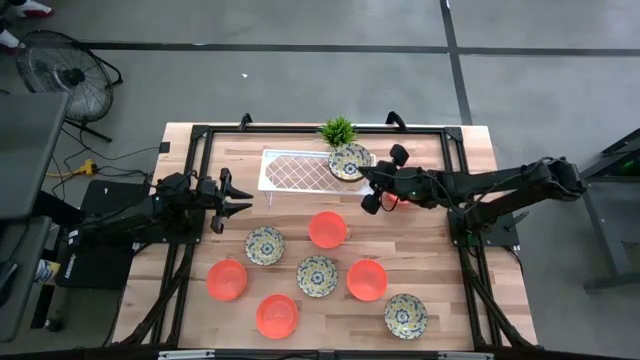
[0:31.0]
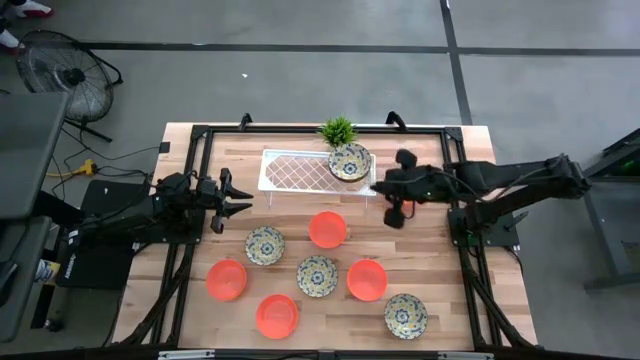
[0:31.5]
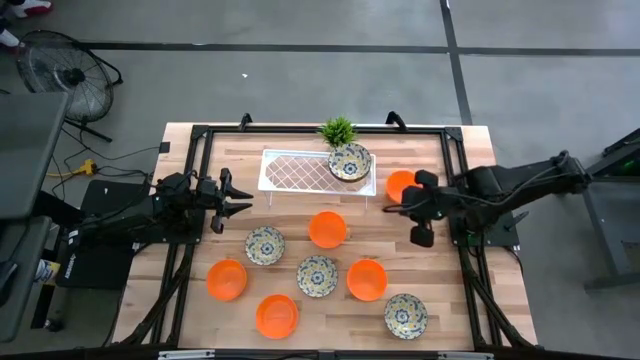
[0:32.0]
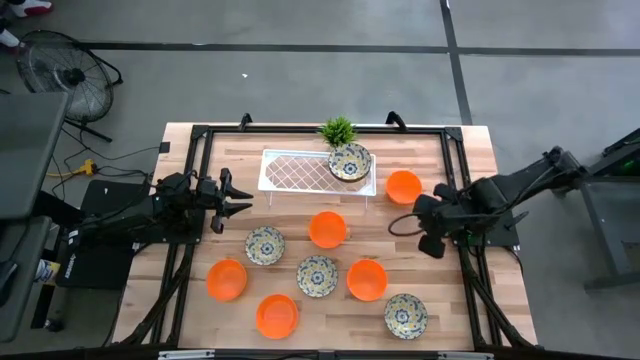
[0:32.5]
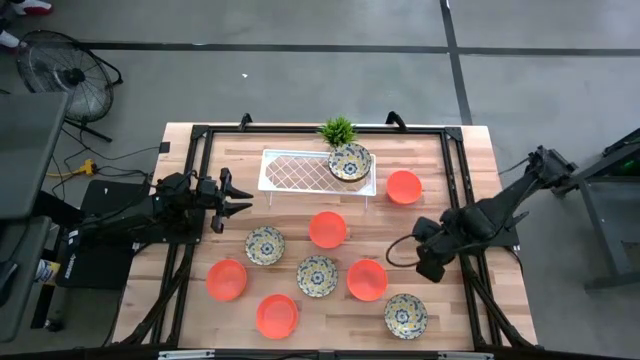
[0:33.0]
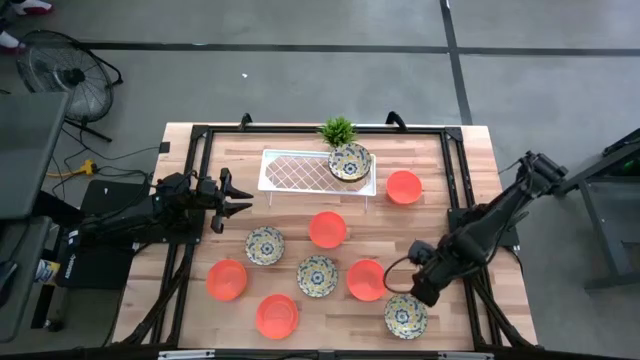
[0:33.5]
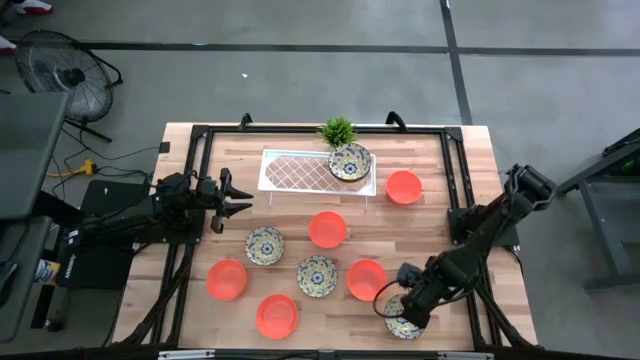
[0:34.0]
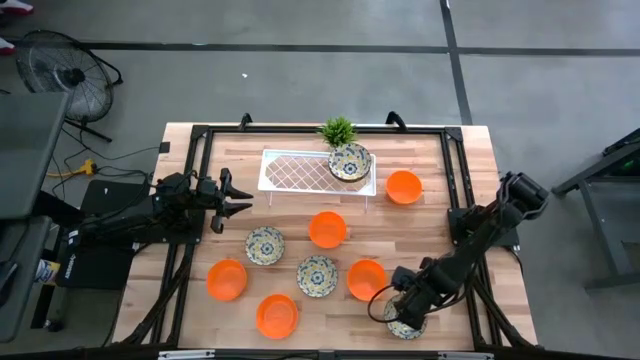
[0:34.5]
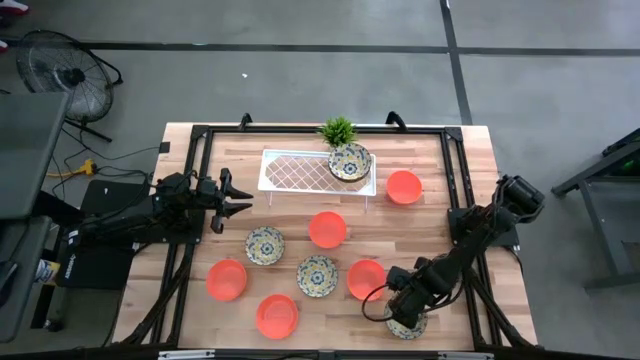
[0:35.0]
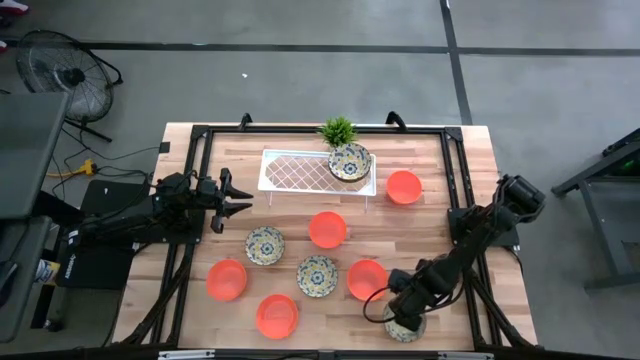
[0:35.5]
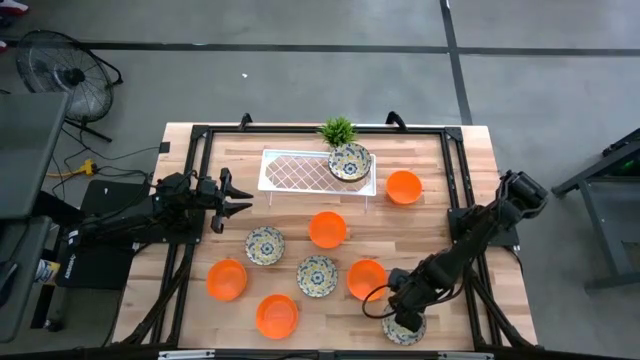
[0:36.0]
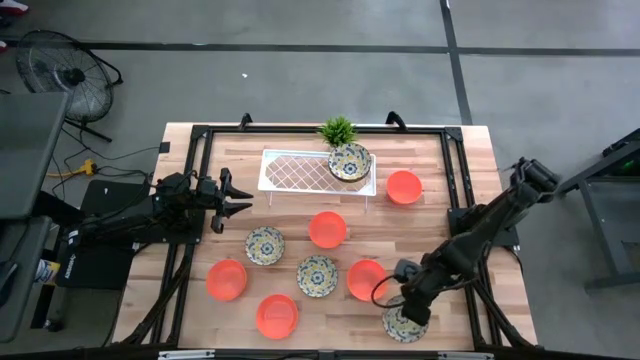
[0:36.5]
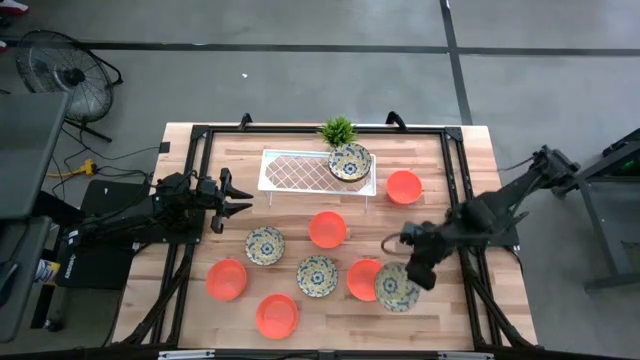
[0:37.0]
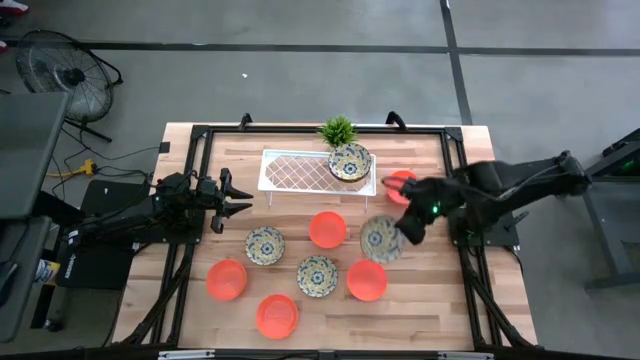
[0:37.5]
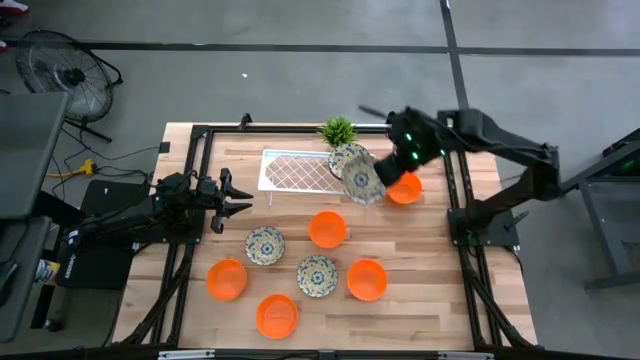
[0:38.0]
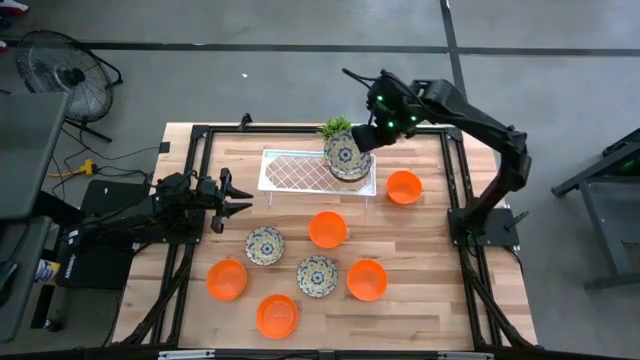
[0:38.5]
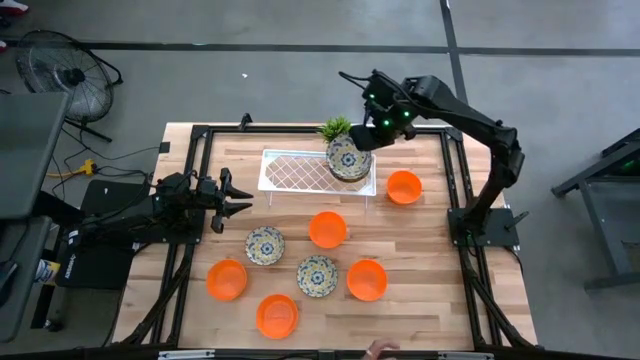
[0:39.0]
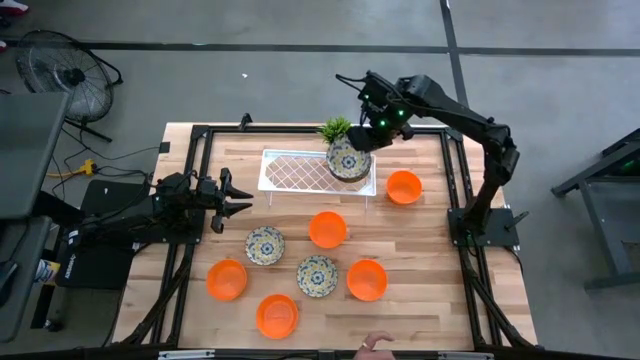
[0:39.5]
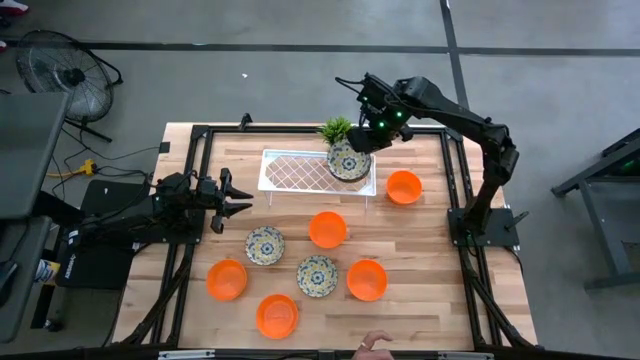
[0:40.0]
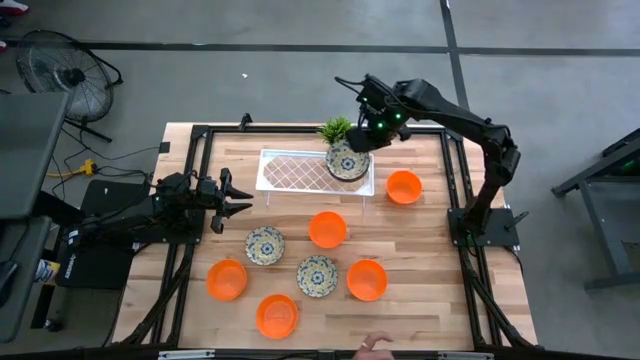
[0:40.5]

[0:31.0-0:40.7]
Task: Pick & Place Mini bowls
Stack the yellow bowl on the yellow bowl on the shelf

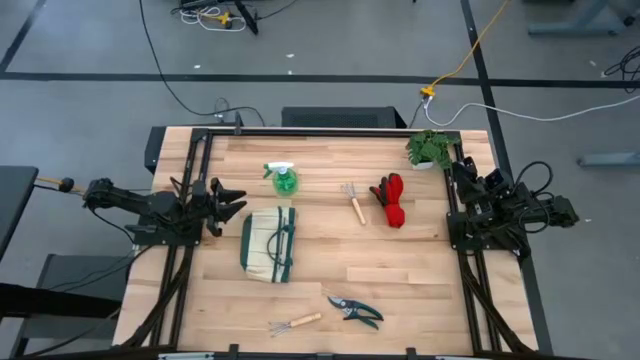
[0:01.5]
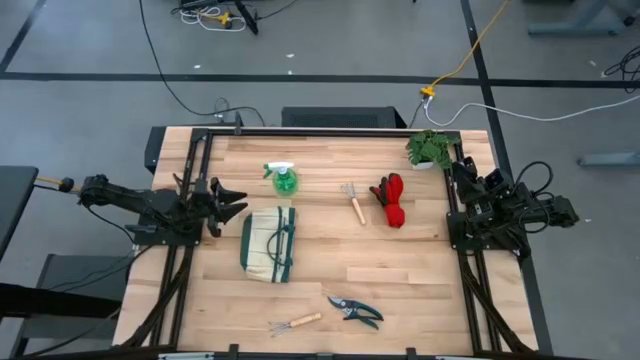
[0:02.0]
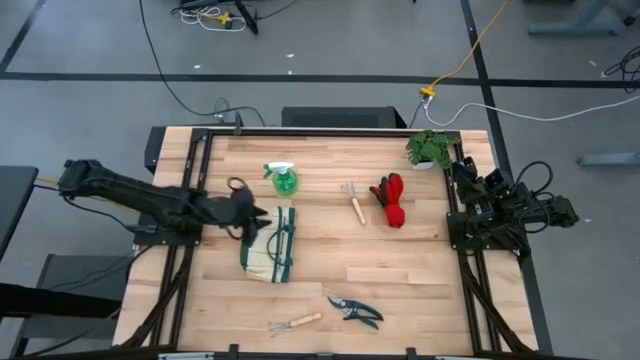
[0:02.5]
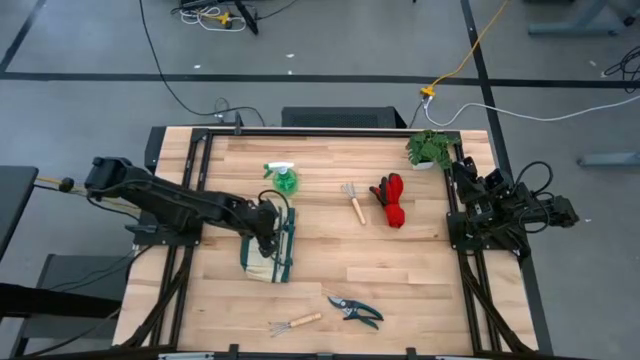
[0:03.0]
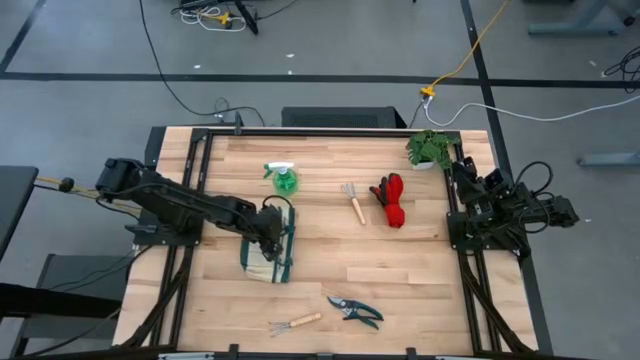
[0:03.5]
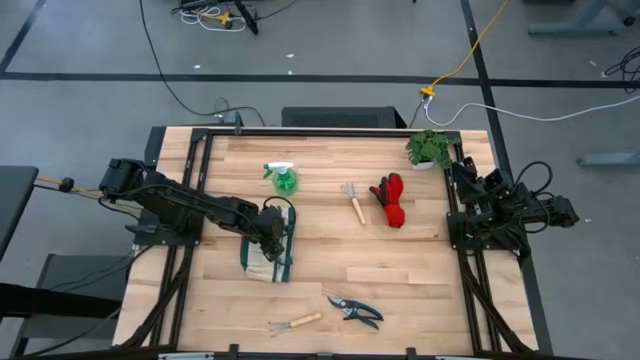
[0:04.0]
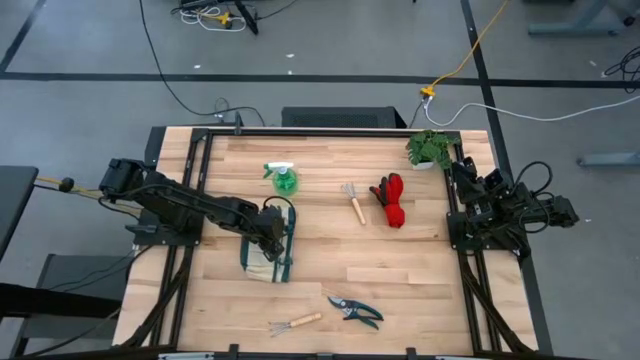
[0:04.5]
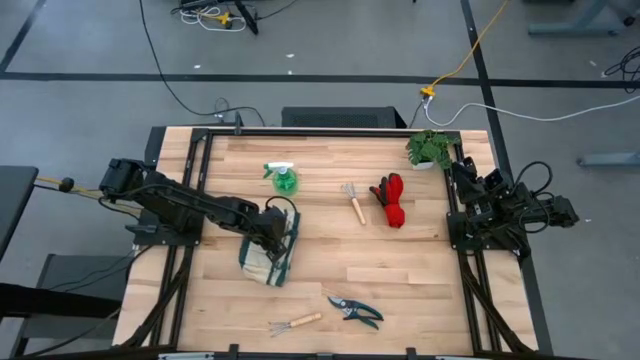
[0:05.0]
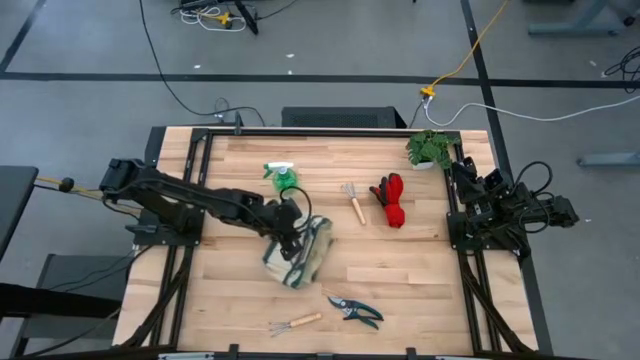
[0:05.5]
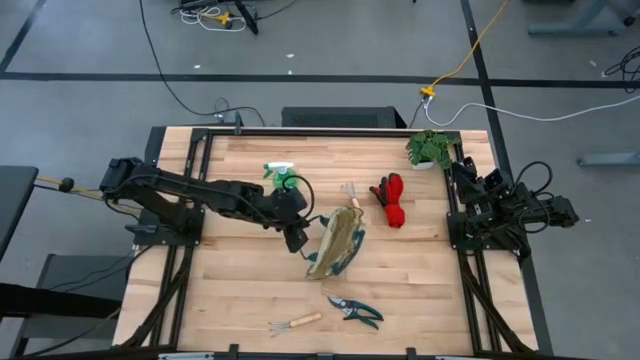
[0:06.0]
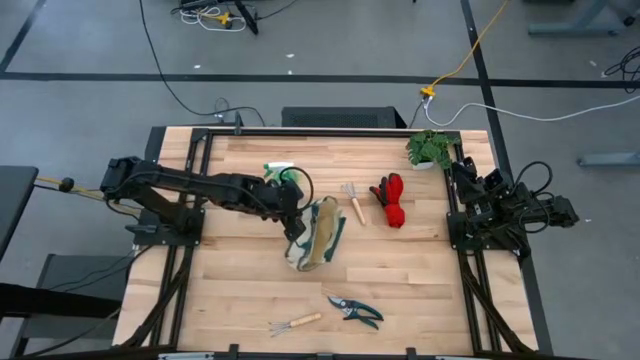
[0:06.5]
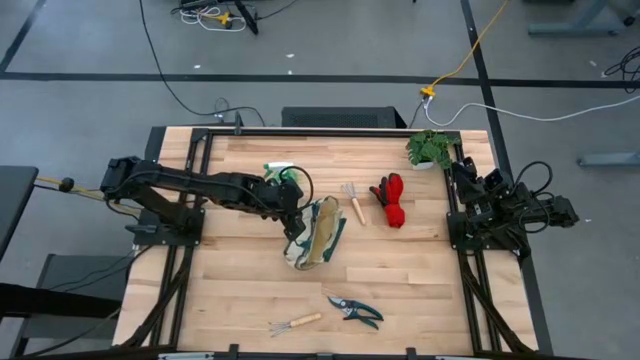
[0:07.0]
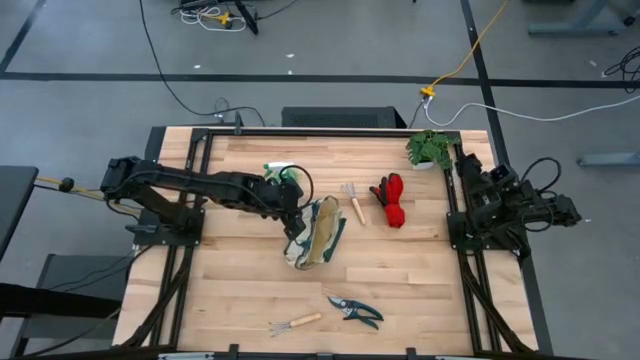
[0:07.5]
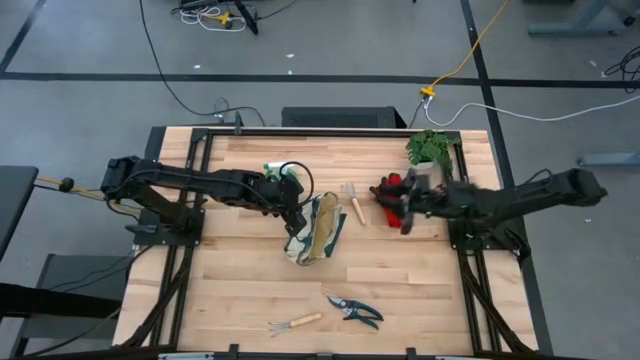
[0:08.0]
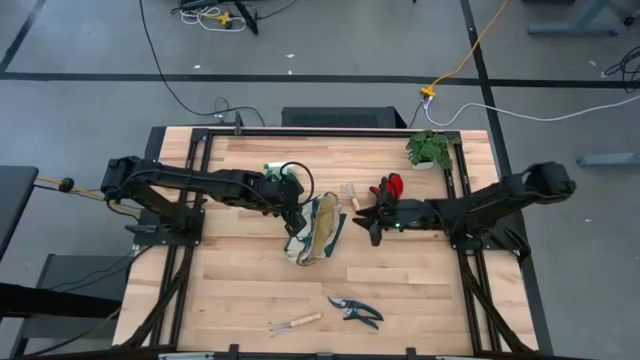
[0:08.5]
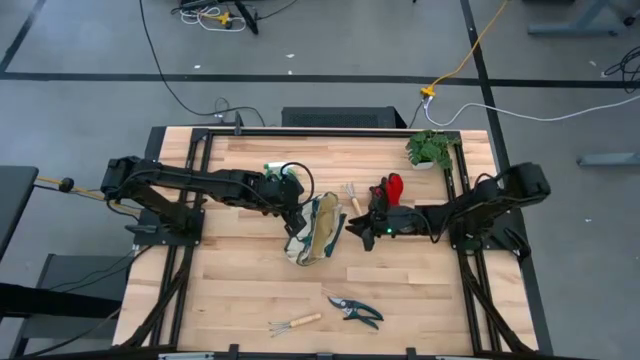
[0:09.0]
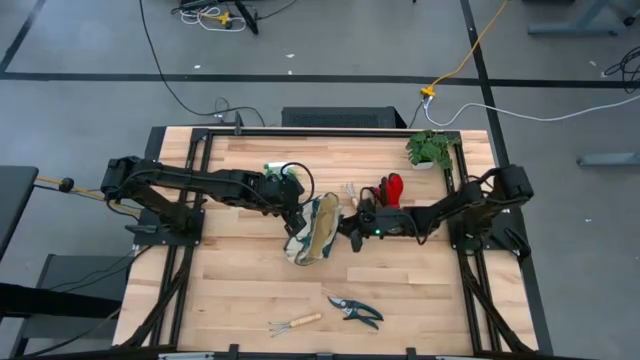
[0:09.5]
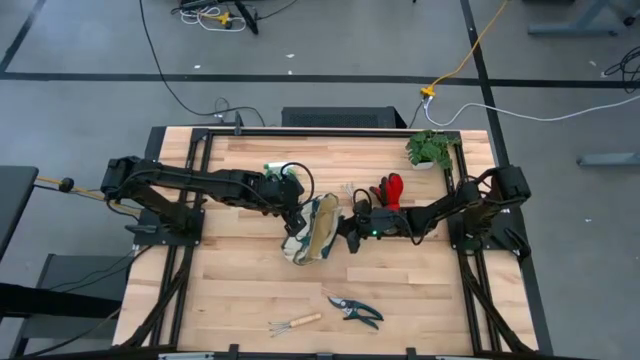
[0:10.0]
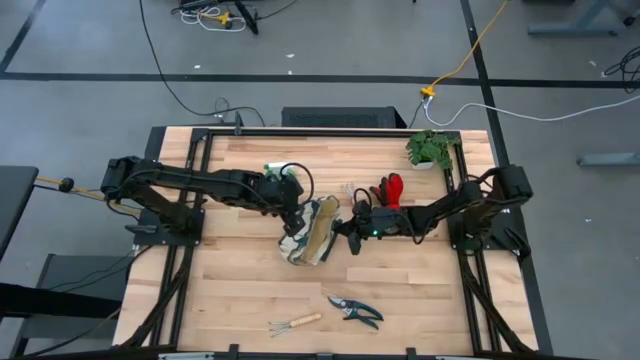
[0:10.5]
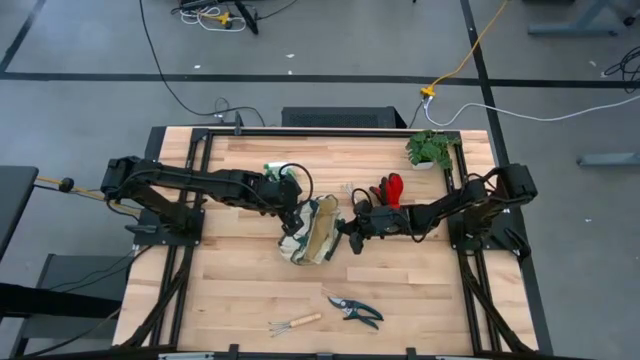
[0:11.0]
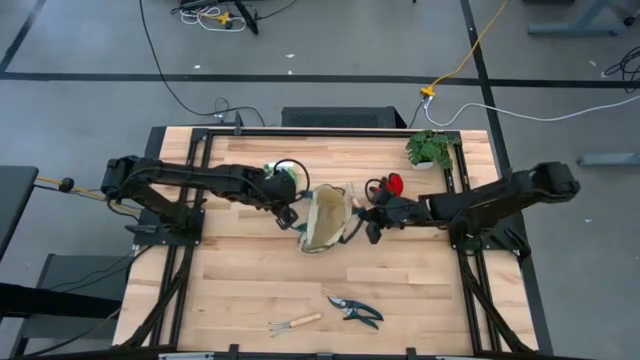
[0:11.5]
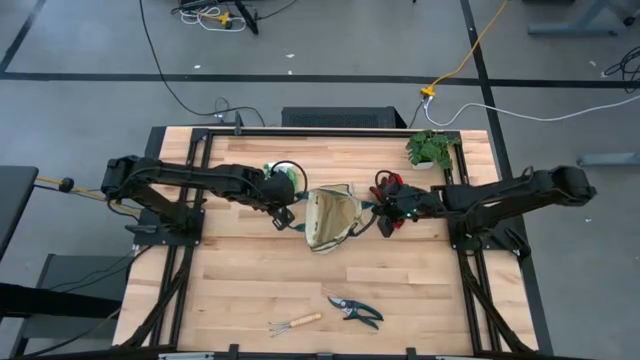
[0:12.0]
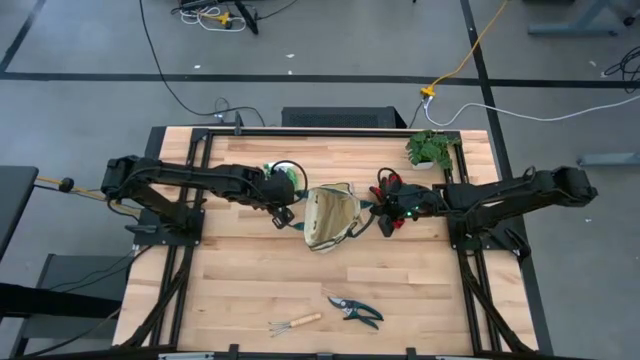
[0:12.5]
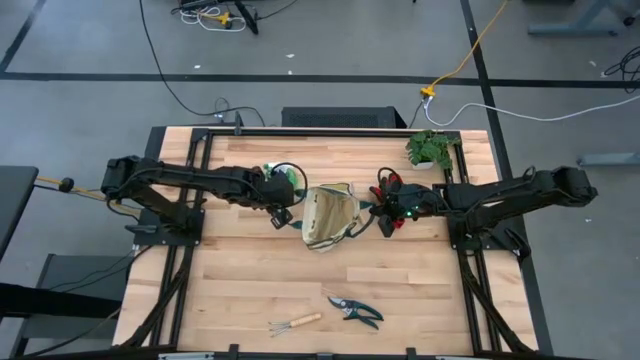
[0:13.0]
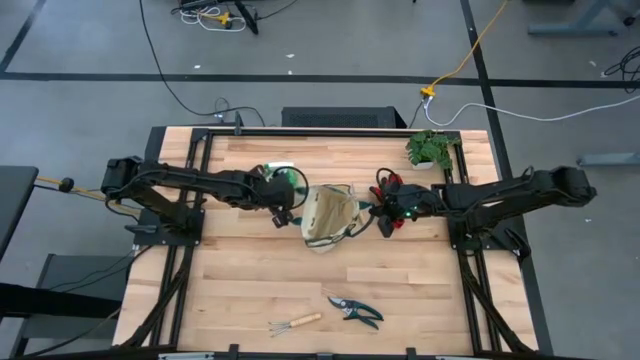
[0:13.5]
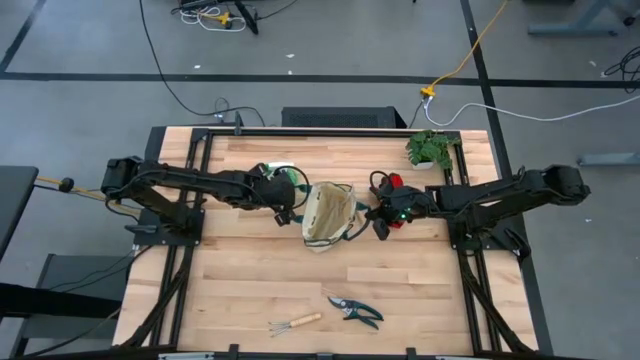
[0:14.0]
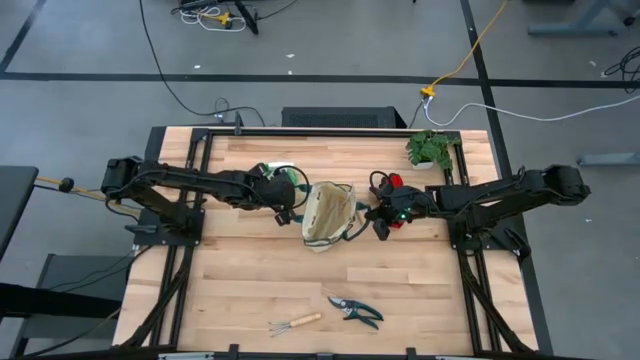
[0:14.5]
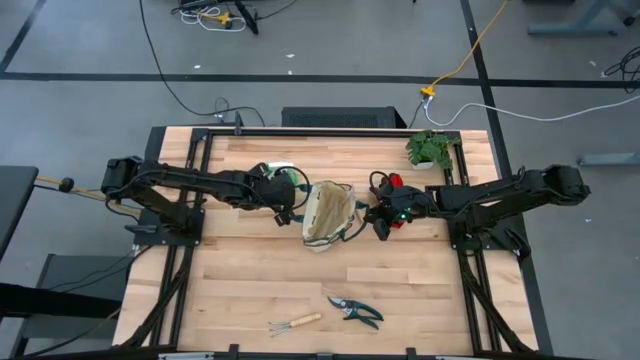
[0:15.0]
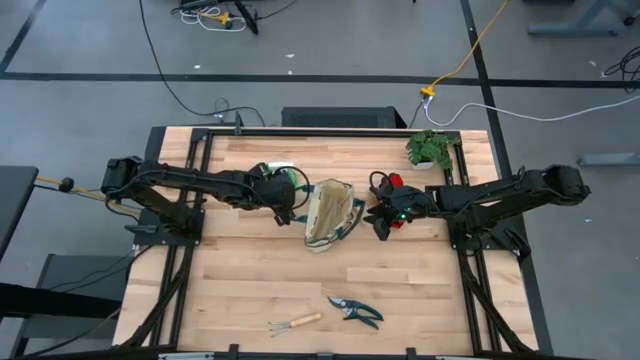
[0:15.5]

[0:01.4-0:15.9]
Task: Pick & Place Garden tools in Gardening bag
Prepare the brown gardening bag
